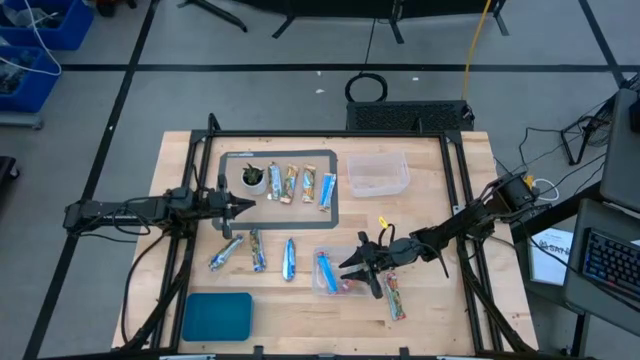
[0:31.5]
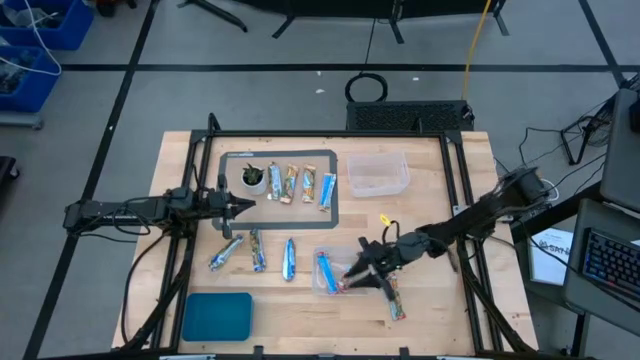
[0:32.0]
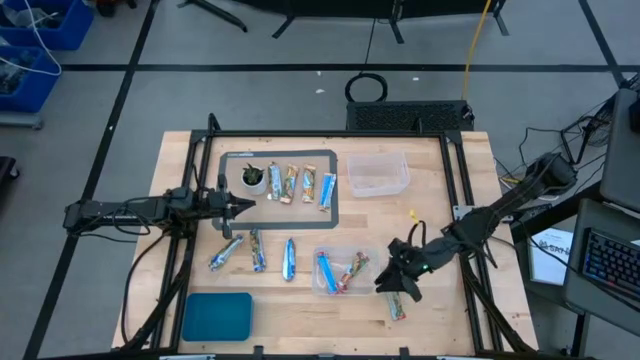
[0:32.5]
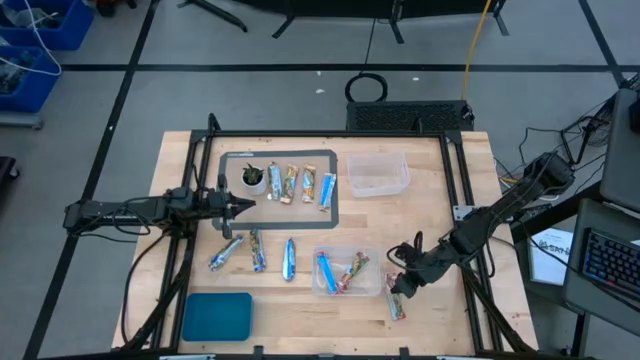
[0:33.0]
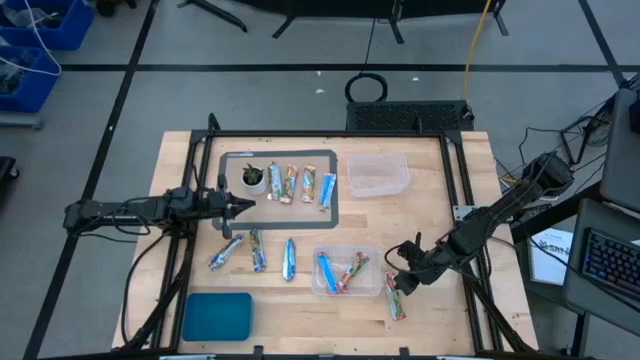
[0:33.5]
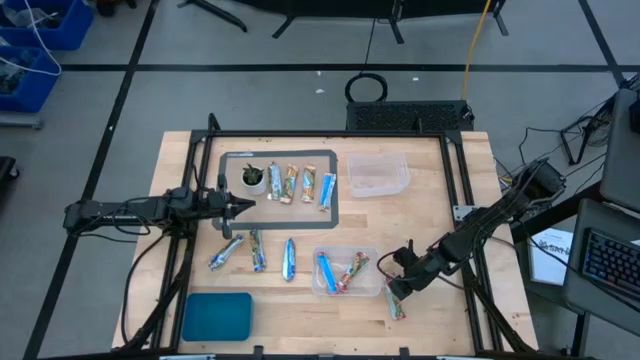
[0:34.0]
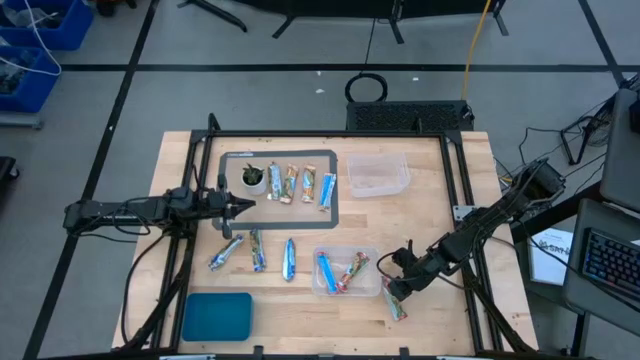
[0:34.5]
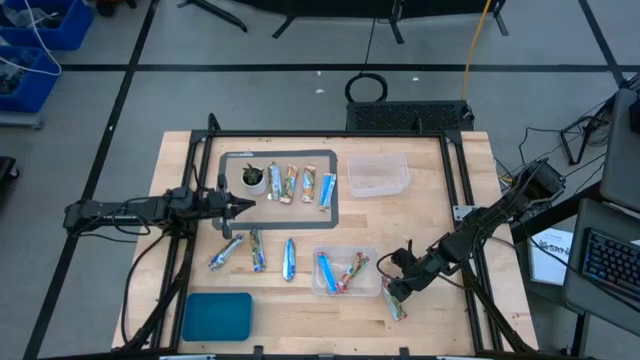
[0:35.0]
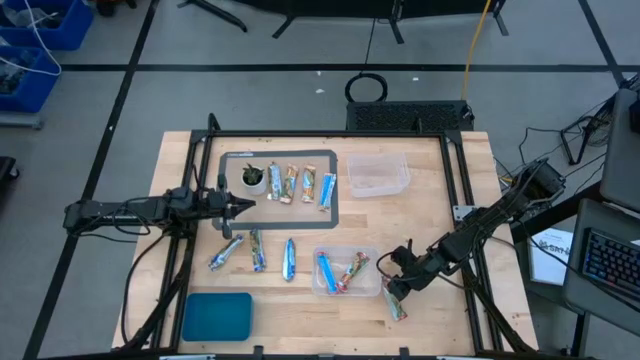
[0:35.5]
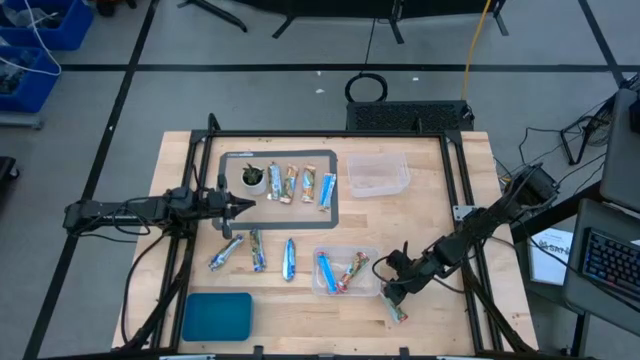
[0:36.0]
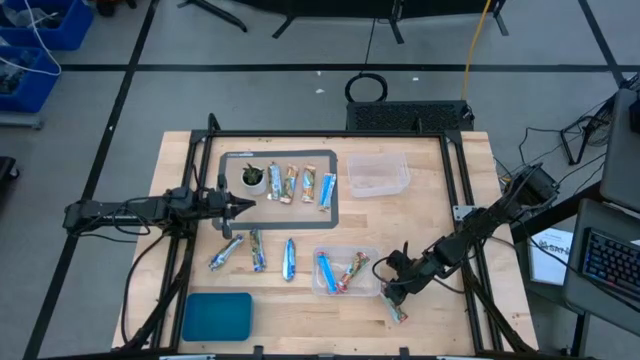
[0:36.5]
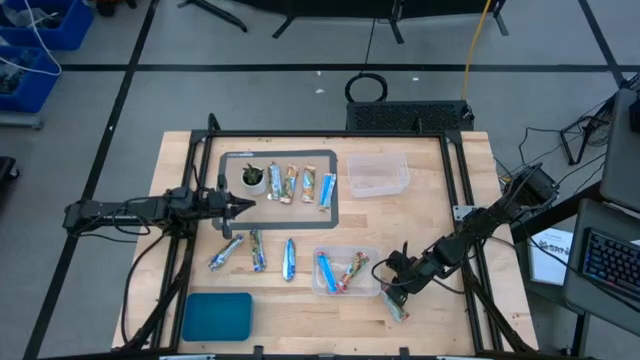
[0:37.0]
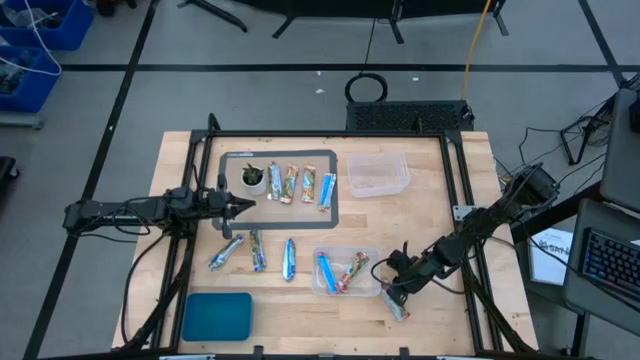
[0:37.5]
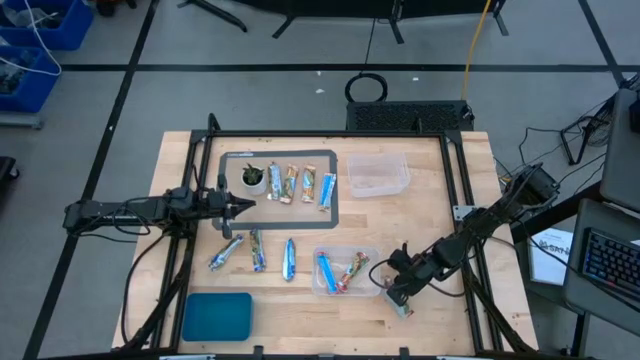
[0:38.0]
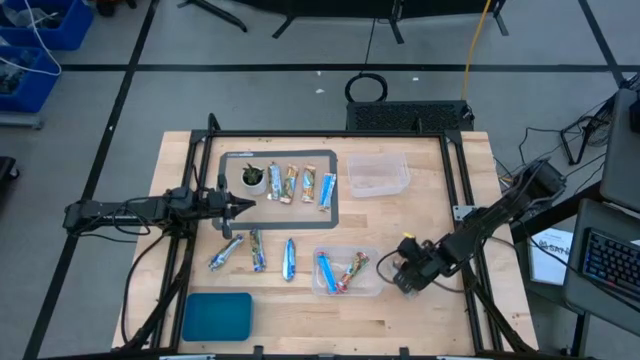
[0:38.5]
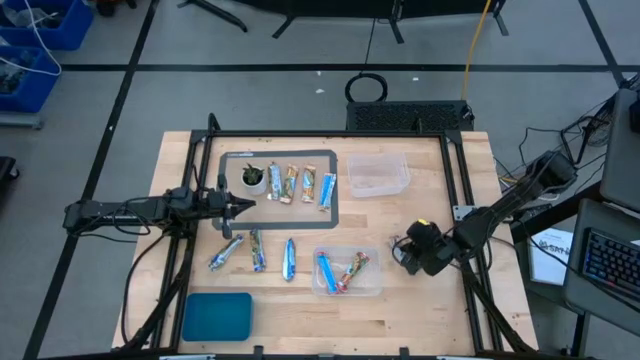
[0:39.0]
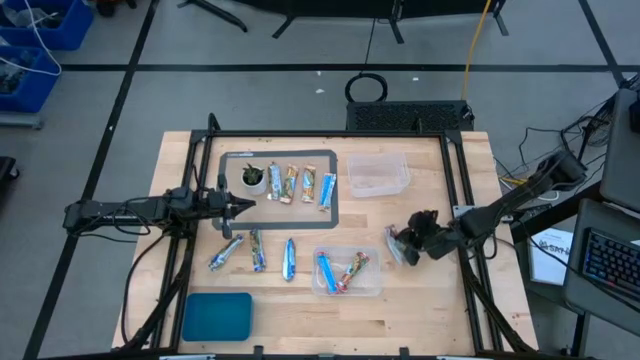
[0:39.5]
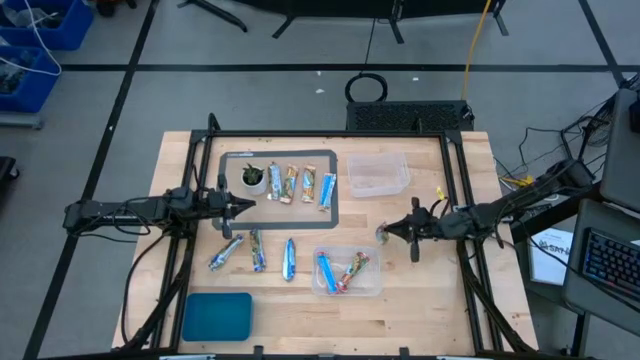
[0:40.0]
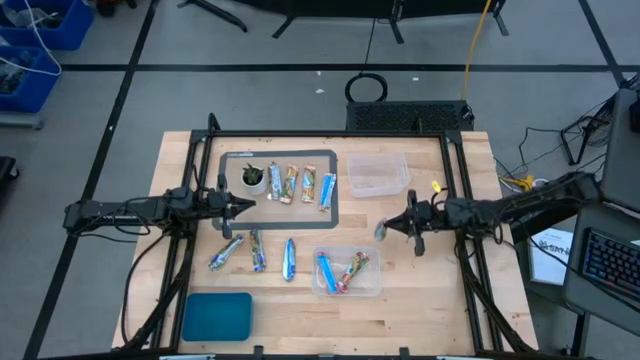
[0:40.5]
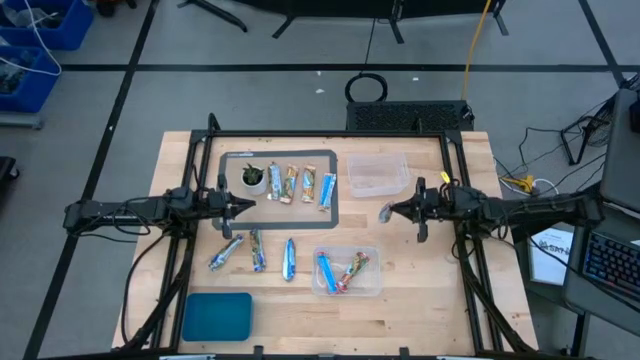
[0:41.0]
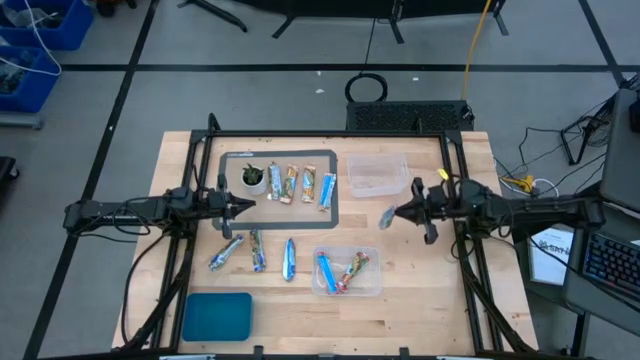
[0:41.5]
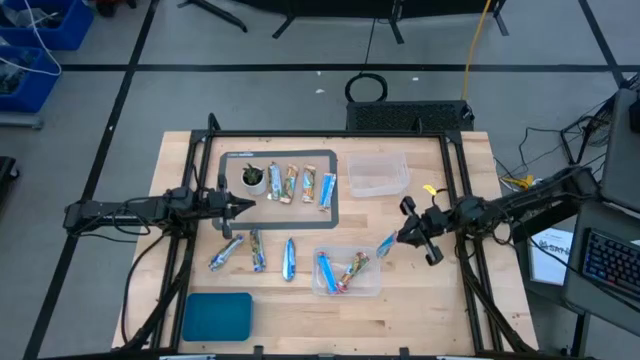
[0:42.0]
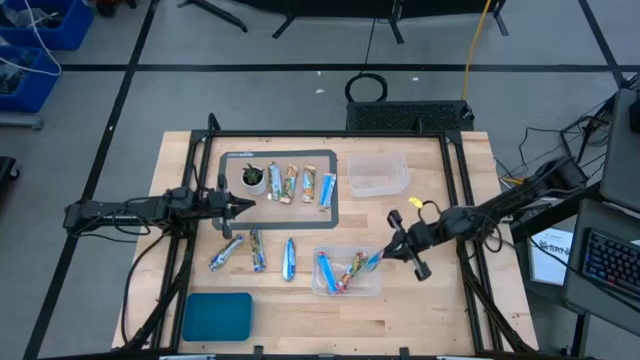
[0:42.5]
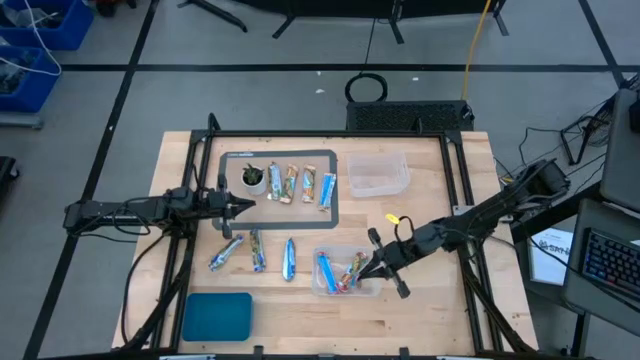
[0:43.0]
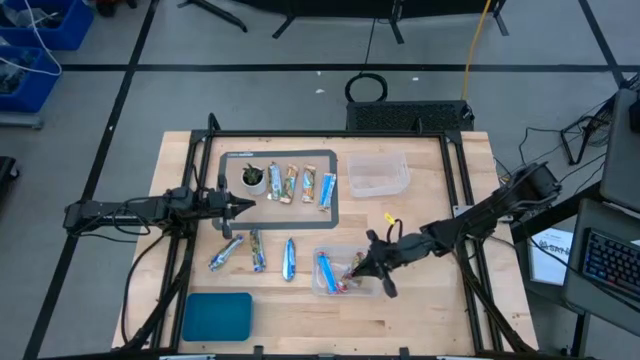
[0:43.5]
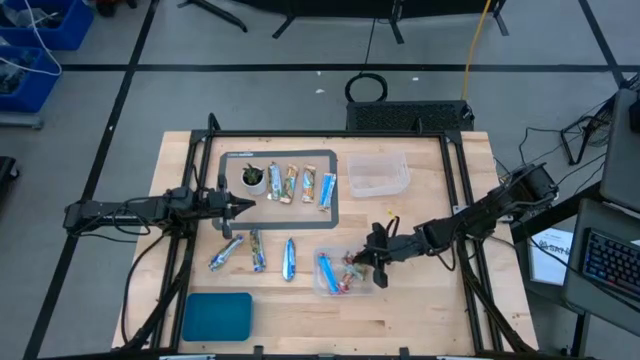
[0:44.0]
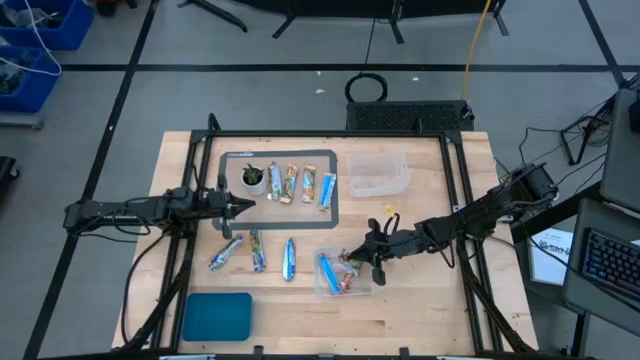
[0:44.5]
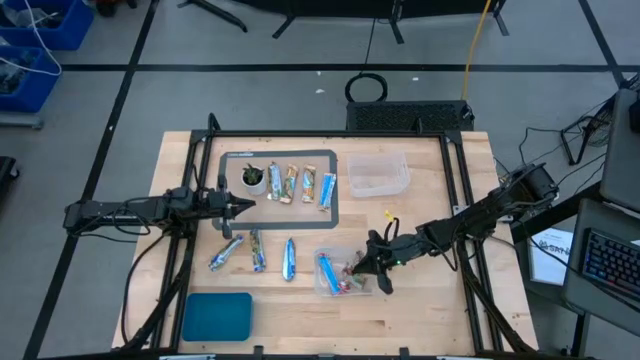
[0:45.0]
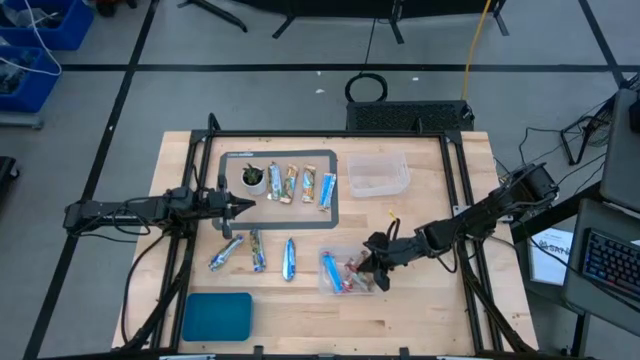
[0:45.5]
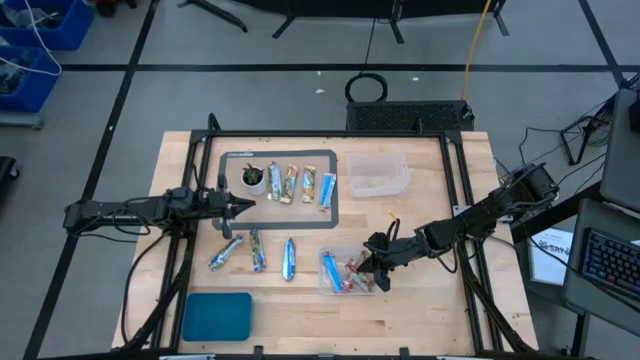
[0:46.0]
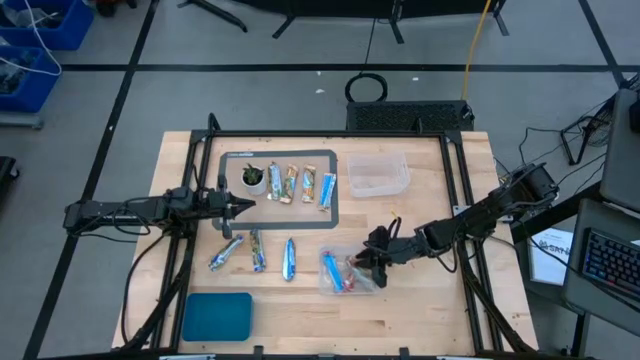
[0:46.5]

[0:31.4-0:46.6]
Task: Pick and place Granola Bars by type
Put the red granola bar into the bottom transparent bin
